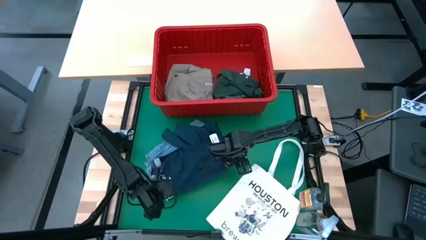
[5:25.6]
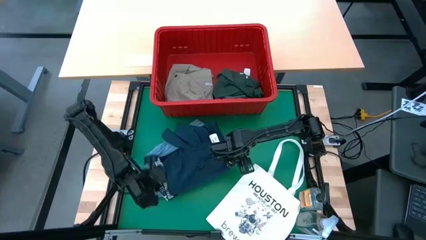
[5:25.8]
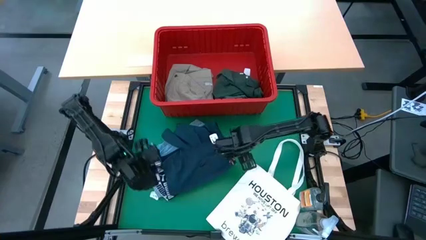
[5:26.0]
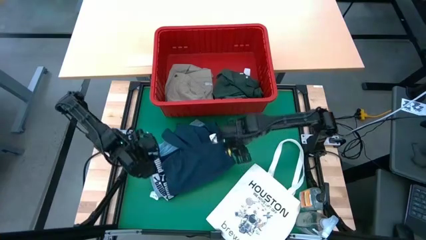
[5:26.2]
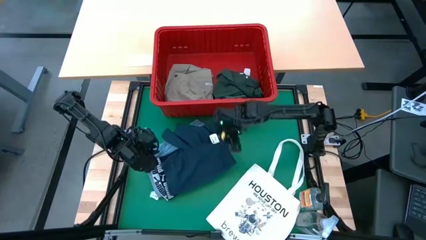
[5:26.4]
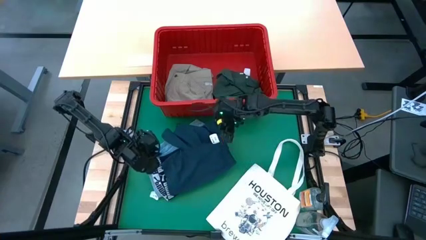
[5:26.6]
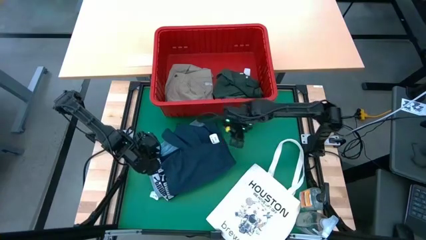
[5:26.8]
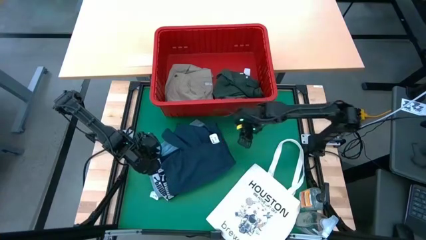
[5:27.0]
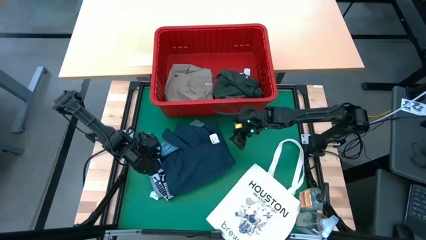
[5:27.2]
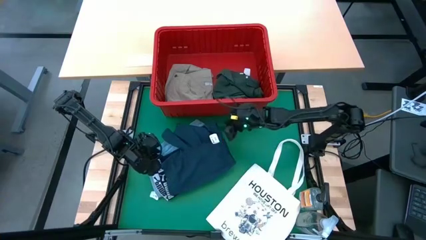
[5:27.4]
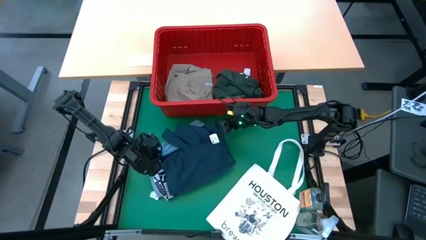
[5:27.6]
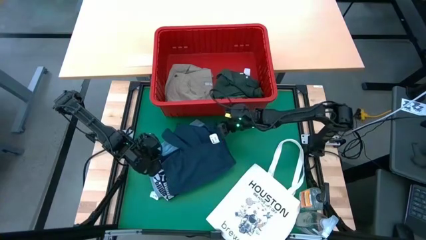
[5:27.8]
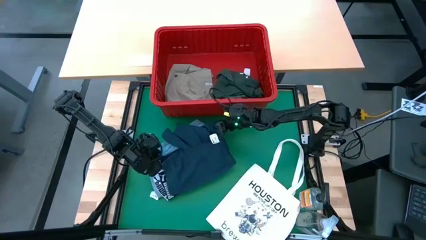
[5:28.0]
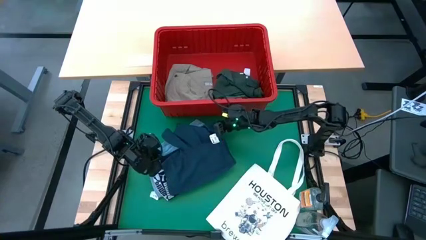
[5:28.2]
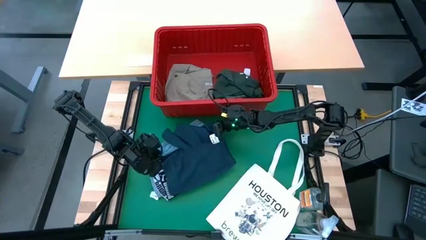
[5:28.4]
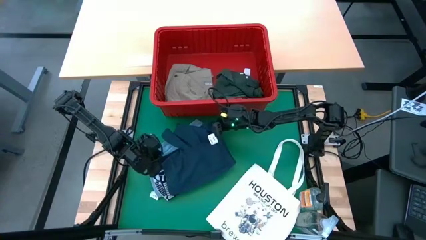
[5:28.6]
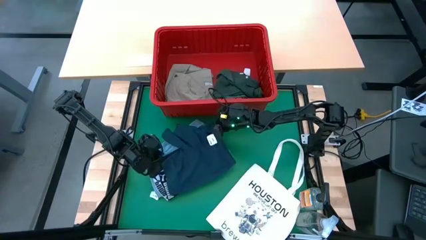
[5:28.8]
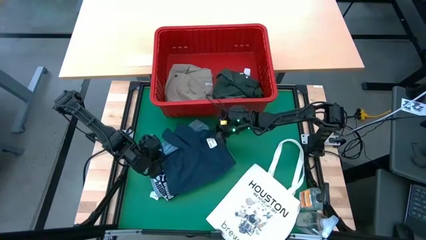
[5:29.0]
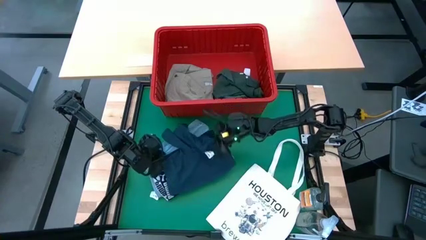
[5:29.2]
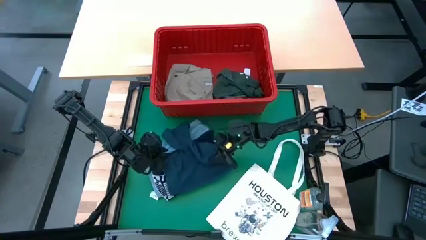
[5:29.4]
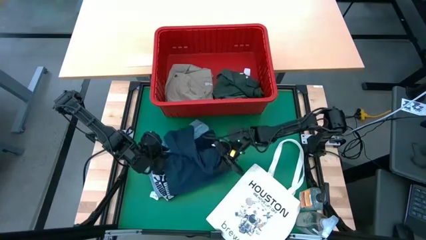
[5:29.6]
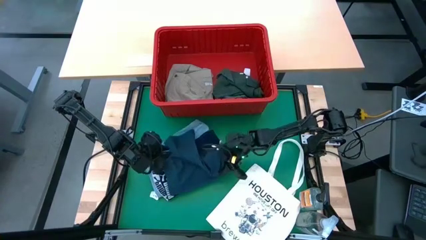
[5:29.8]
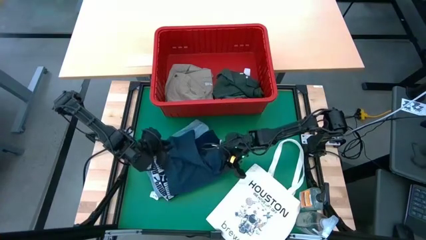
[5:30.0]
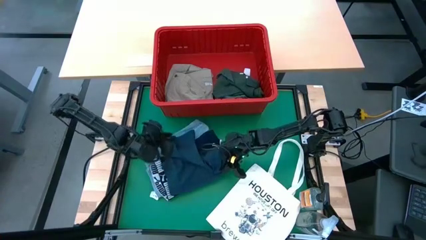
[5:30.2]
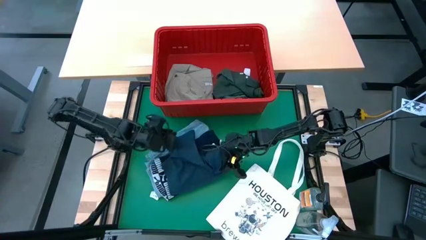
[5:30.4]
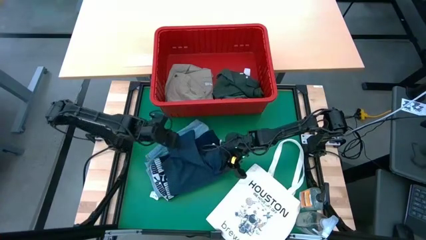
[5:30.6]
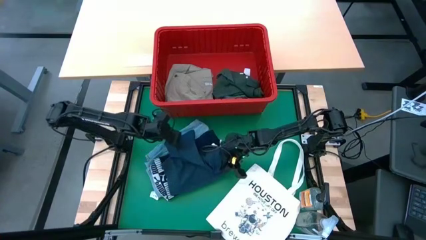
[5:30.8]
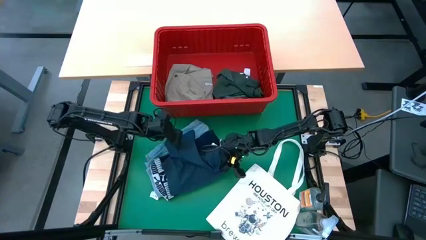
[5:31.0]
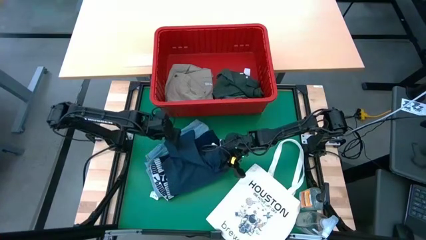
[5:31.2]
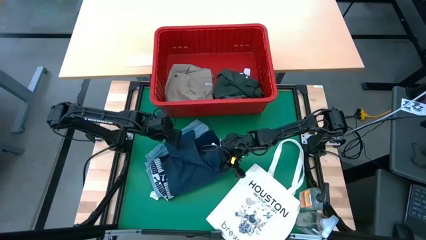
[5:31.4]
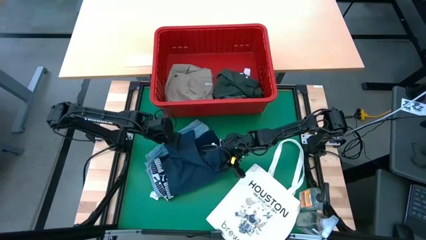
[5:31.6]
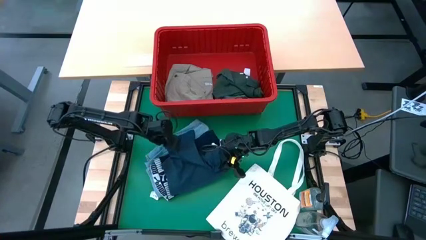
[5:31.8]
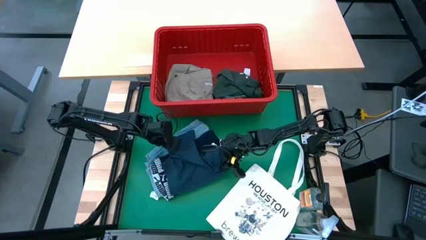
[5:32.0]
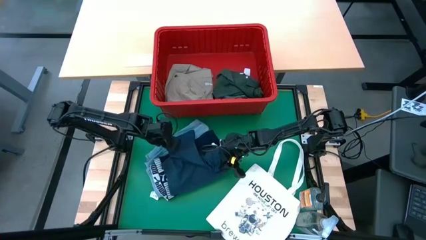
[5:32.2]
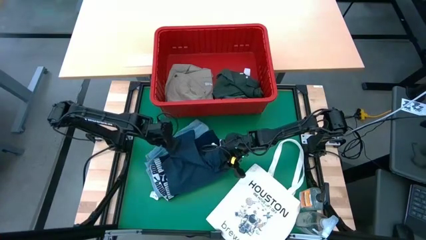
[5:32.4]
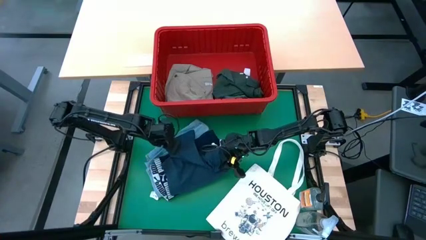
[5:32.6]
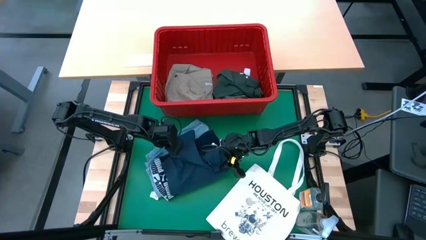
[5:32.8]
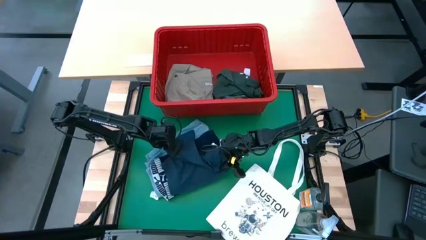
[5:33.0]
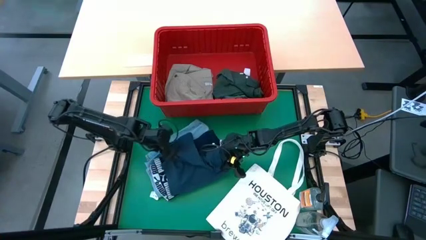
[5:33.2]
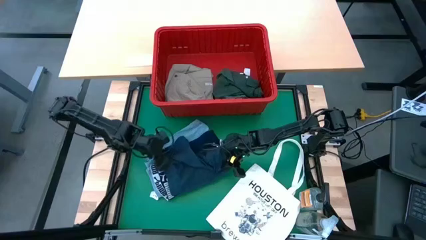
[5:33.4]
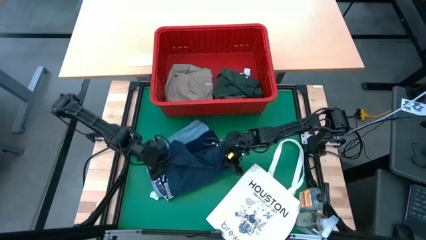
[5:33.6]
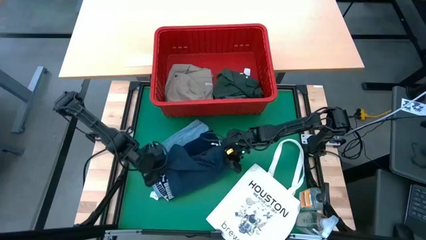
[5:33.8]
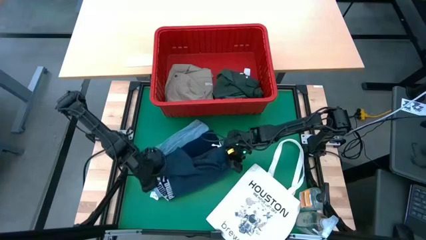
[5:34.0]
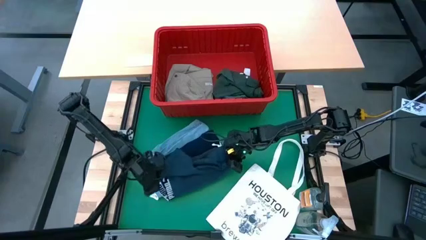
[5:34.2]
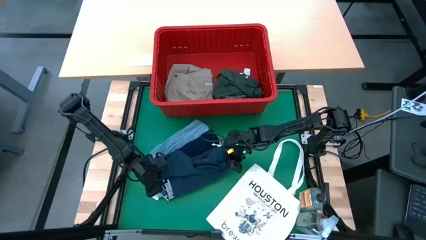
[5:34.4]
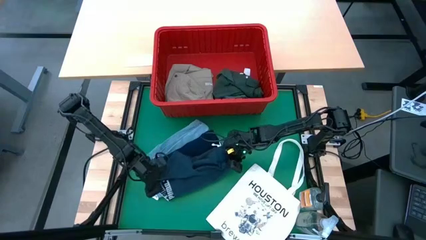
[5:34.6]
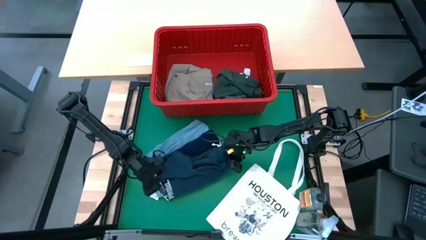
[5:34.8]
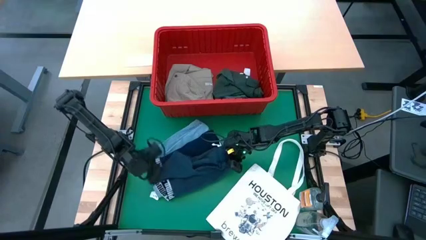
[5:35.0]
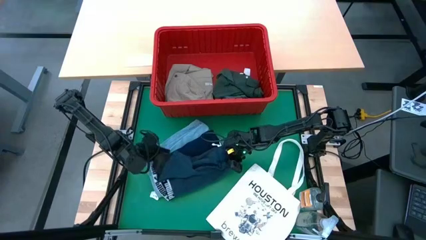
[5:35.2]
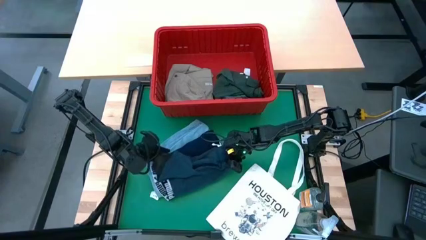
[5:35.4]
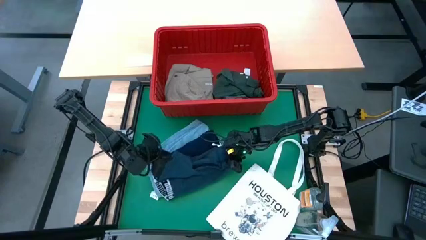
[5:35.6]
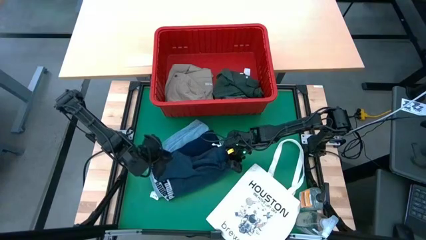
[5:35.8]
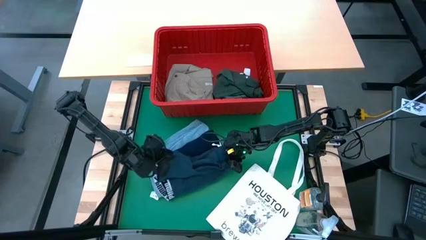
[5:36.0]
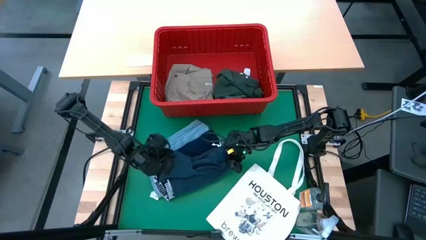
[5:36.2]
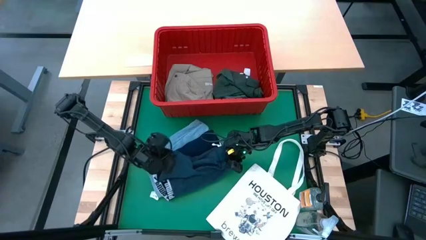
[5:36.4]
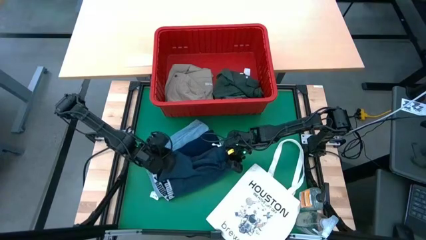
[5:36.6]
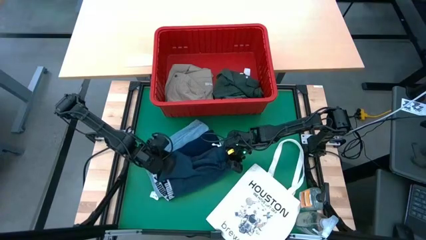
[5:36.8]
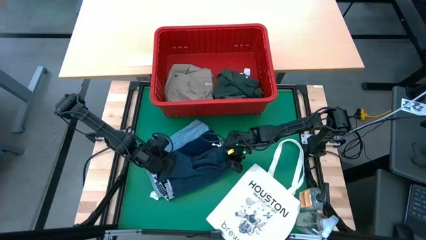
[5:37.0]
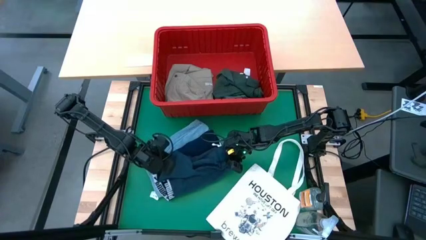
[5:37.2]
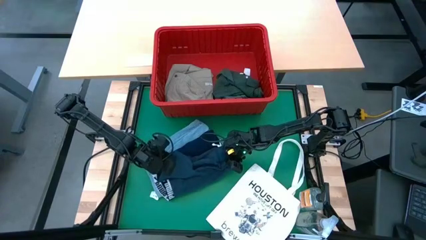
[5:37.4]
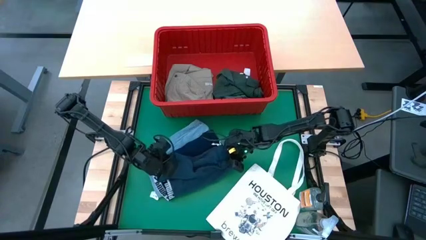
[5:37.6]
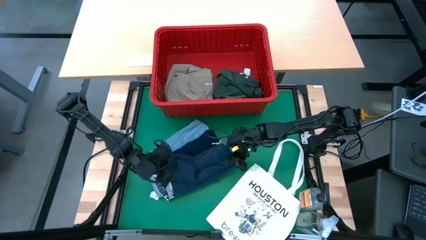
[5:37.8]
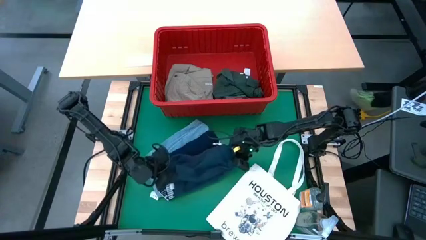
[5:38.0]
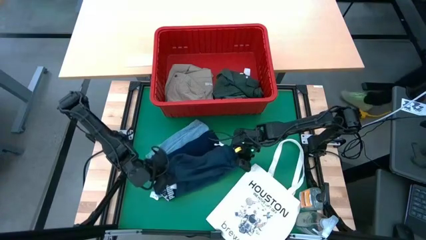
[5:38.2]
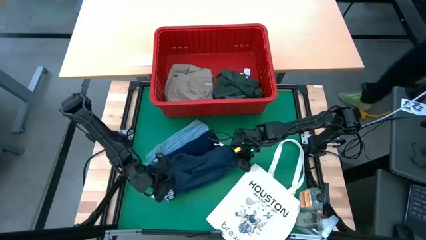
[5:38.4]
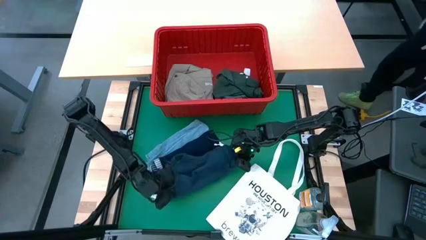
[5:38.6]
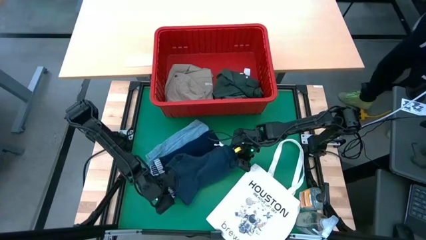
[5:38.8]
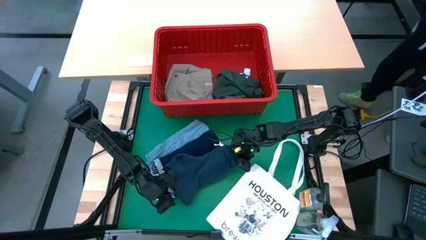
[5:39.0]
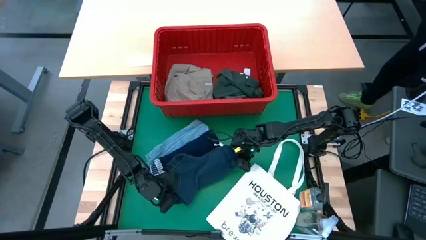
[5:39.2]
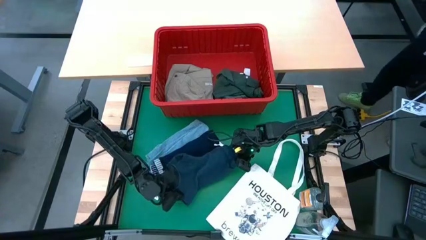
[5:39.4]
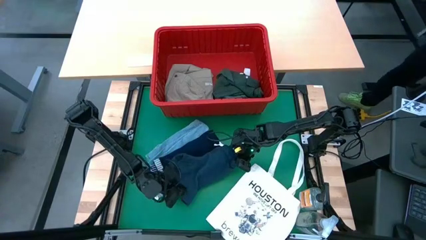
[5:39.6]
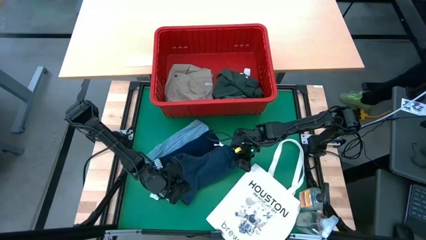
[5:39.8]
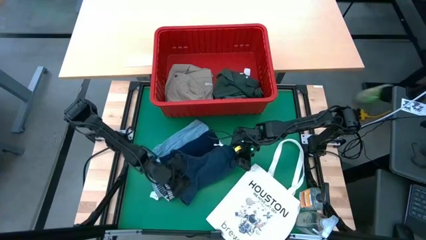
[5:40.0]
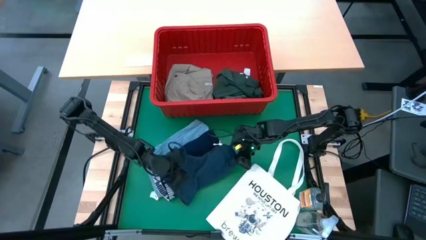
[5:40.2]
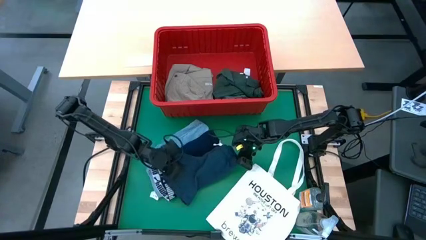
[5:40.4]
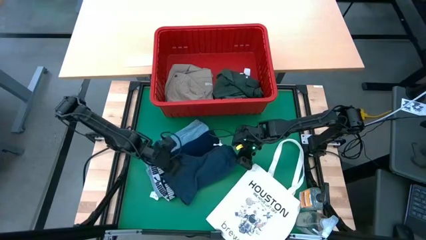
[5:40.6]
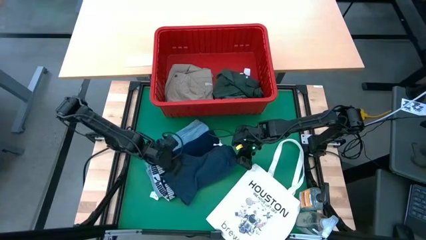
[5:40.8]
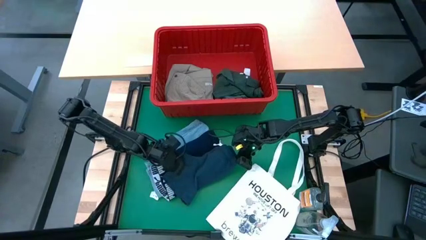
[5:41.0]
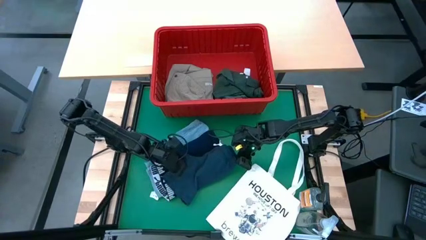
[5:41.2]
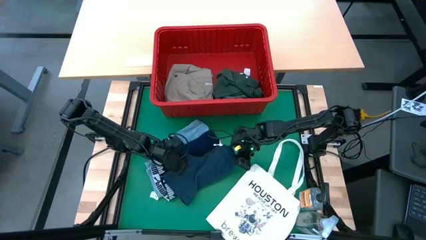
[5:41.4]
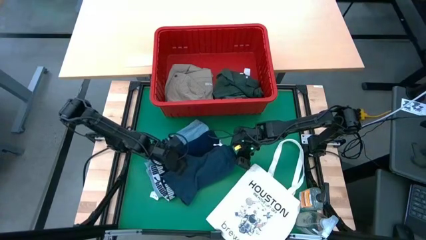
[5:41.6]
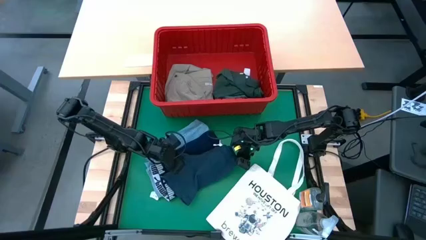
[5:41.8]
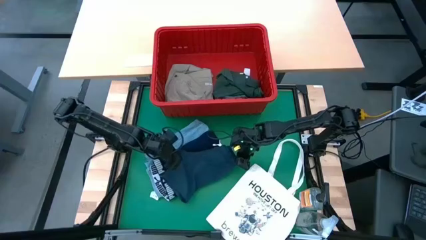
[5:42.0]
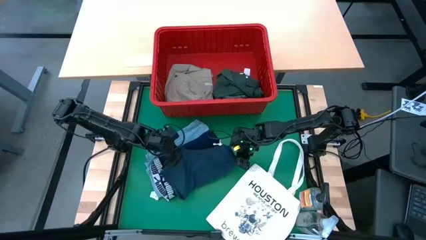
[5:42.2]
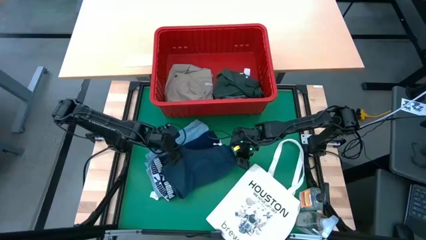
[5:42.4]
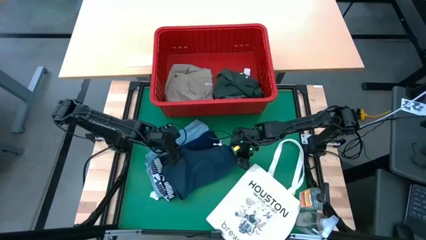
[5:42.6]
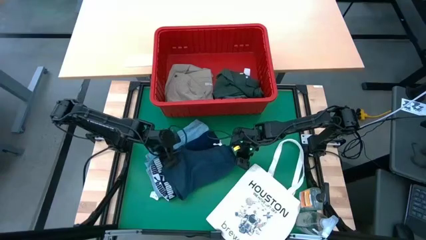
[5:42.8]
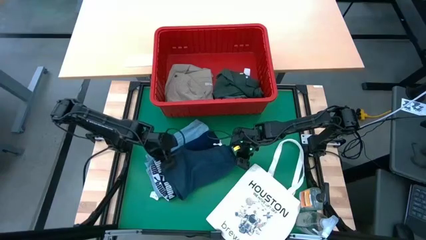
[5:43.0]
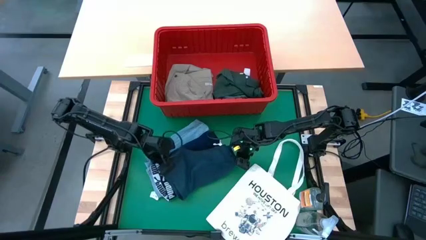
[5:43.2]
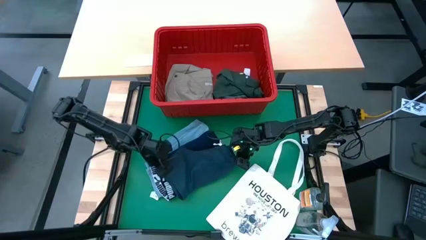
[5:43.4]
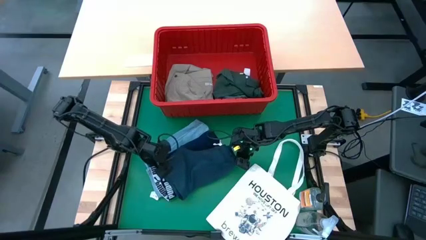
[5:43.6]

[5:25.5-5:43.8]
Task: Fold Laundry from Bin
Fold the gray shorts
